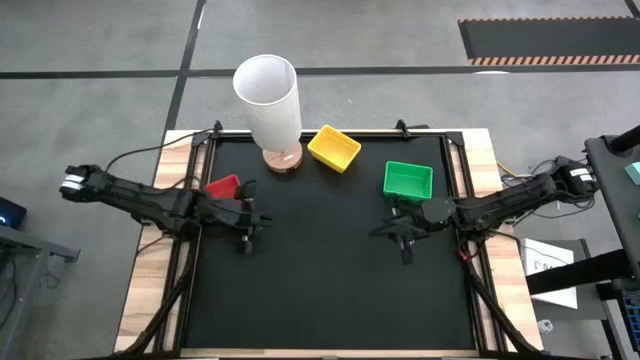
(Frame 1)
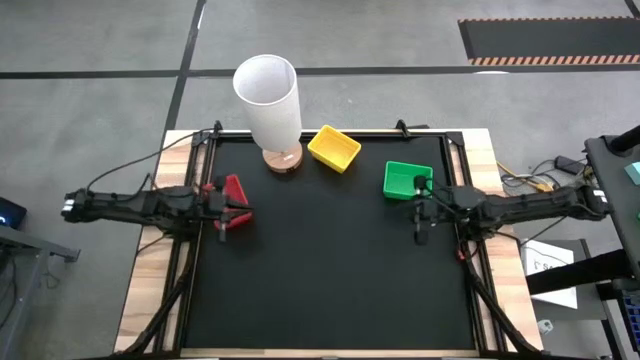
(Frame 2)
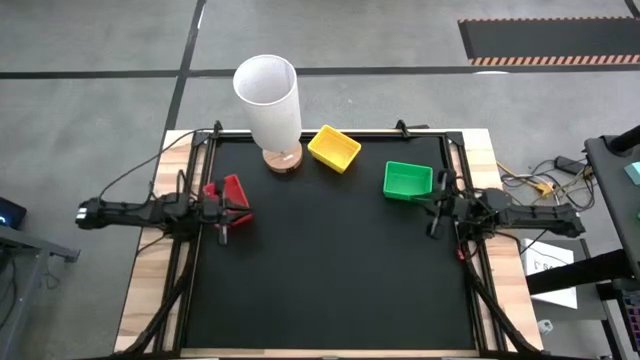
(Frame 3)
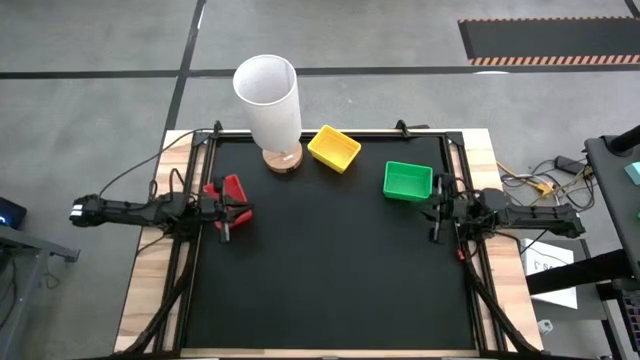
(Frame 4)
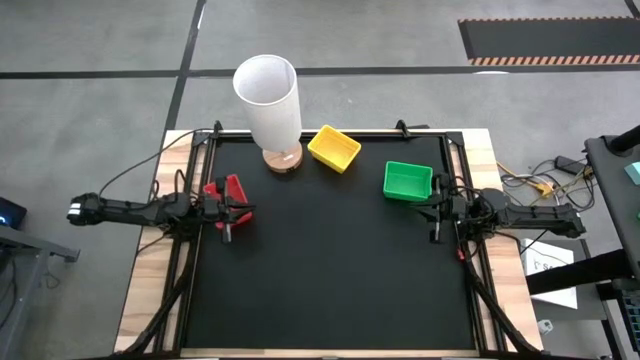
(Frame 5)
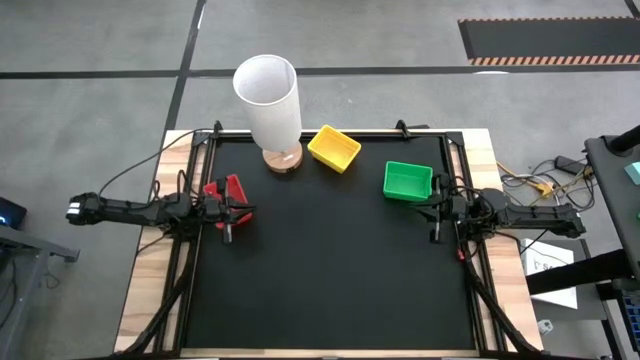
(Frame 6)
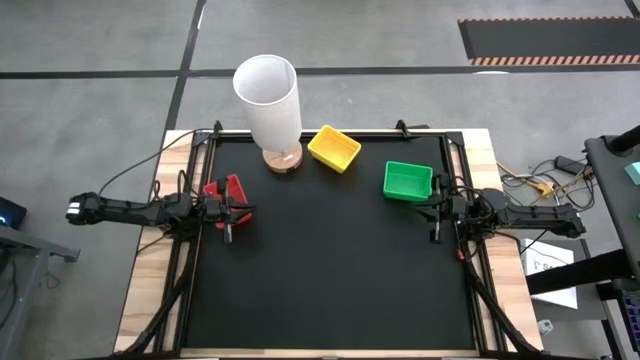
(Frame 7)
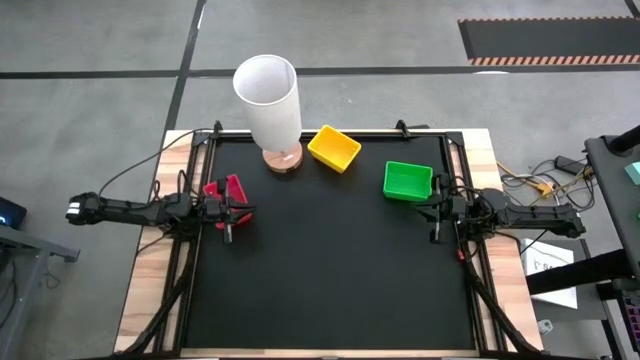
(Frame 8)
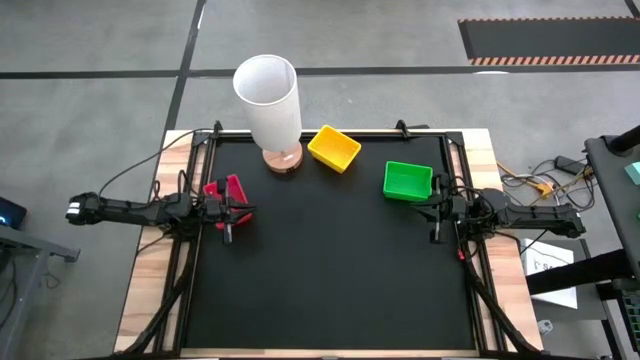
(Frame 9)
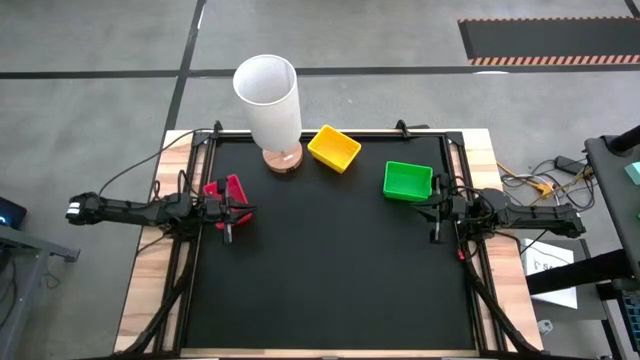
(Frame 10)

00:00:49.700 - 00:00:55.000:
Return to Home Position

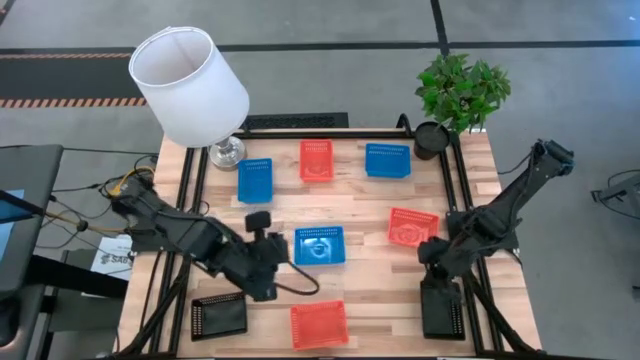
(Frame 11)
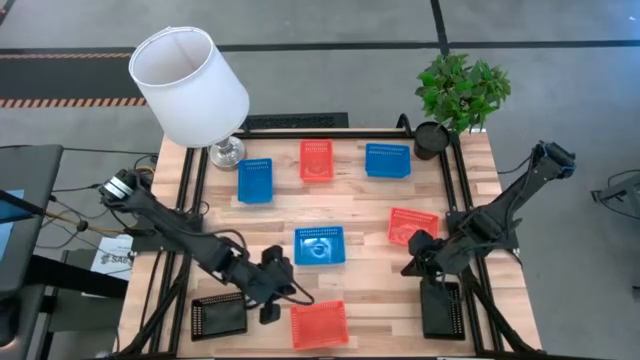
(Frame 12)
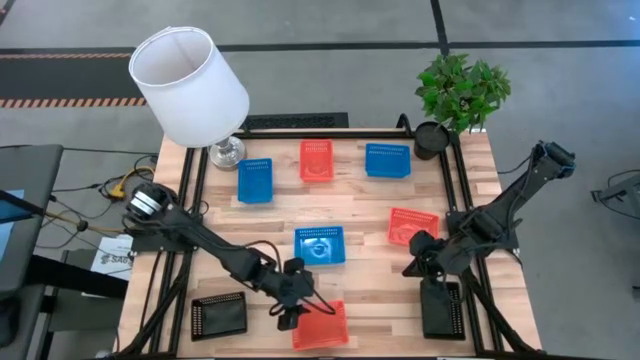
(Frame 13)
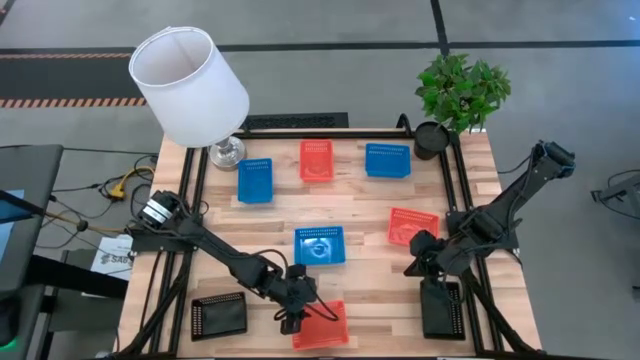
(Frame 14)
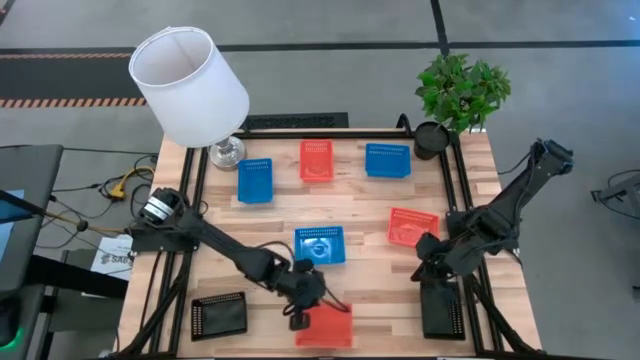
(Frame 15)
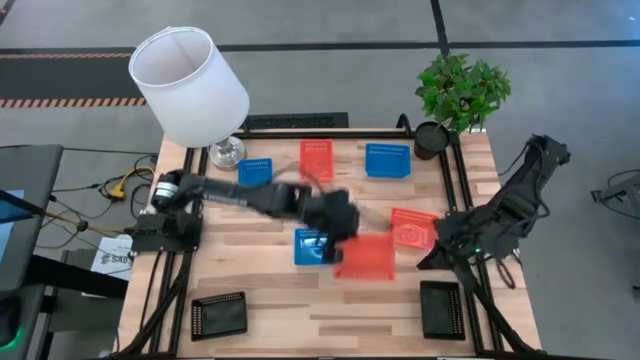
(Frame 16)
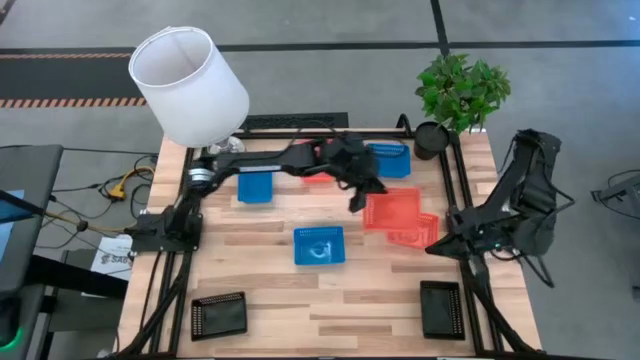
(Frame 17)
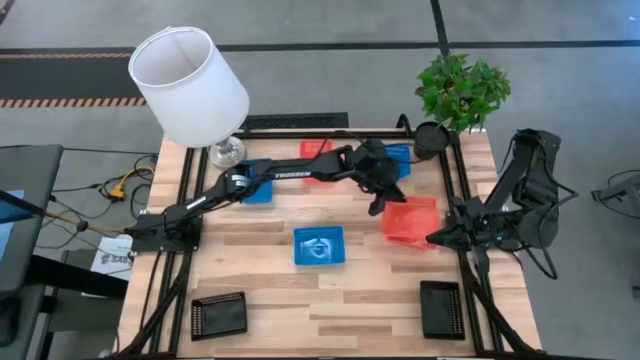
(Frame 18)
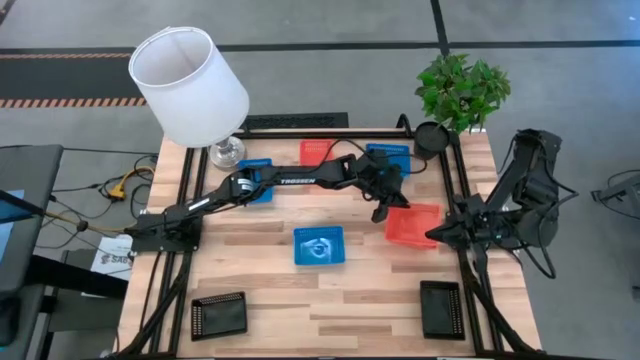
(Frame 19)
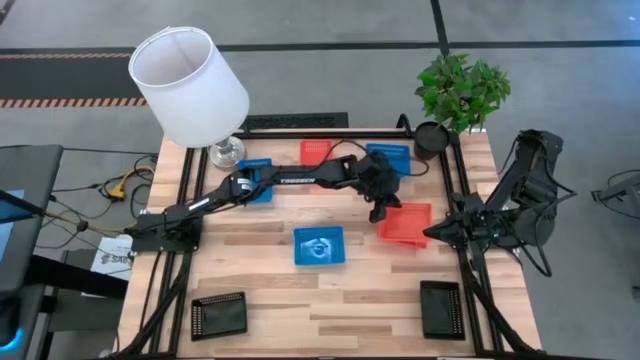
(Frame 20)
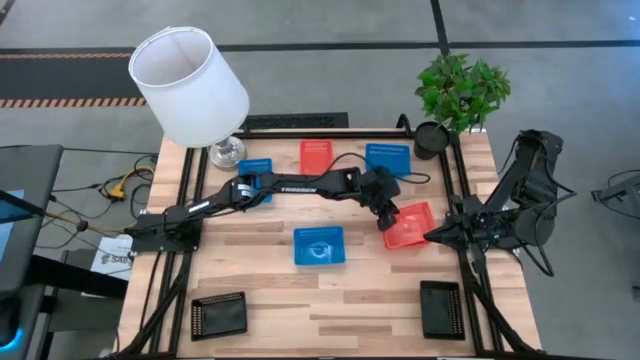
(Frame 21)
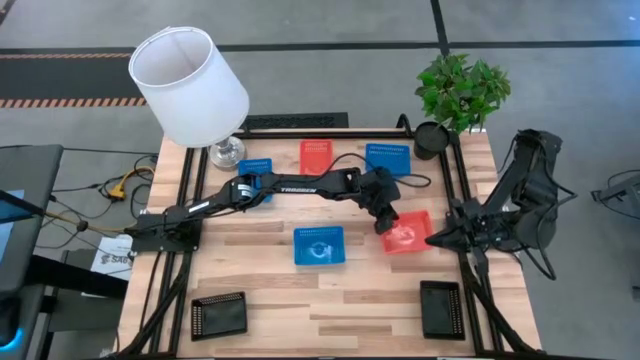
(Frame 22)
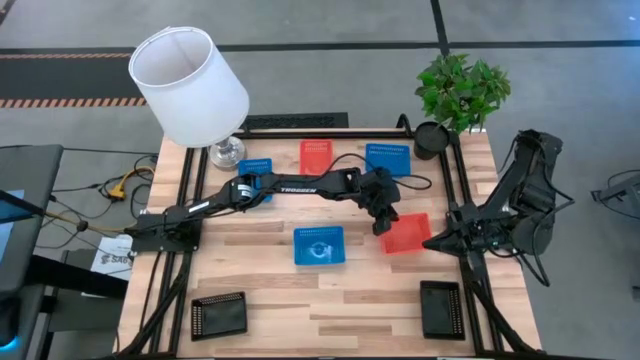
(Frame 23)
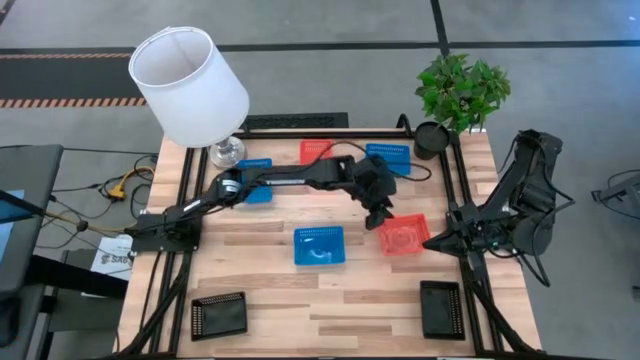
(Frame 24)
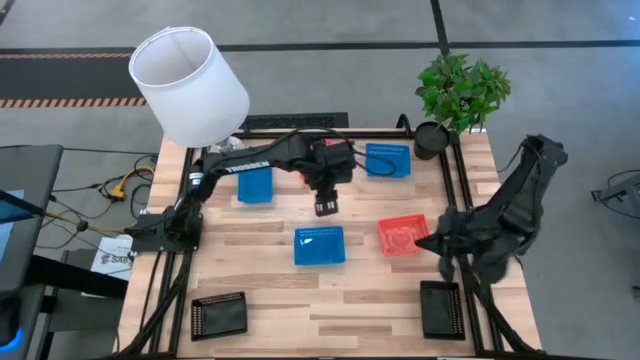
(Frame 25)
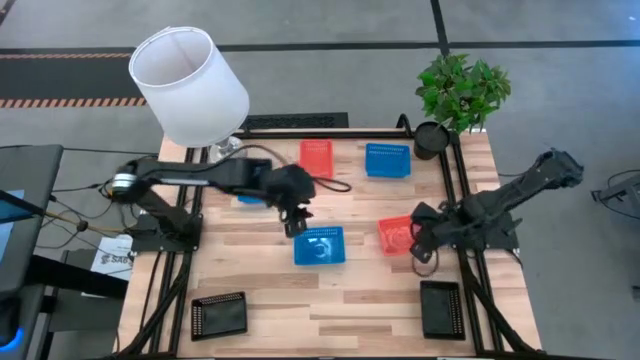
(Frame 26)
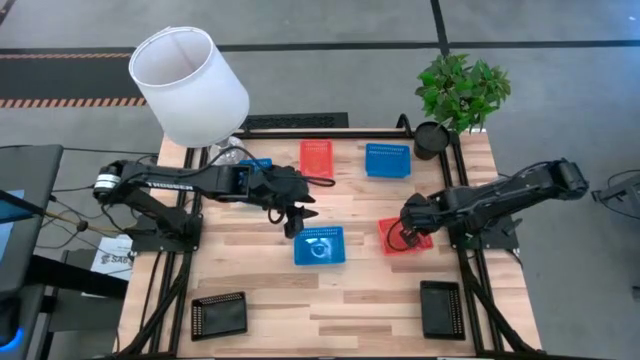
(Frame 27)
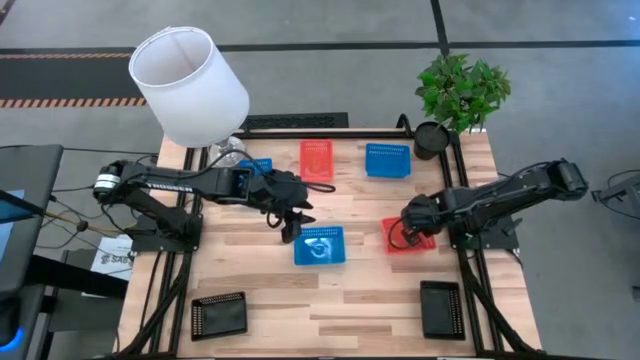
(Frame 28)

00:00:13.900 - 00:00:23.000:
Stack the bottom orange bin on top of the middle orange bin

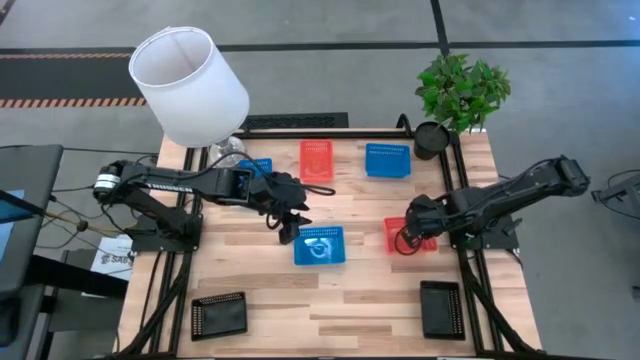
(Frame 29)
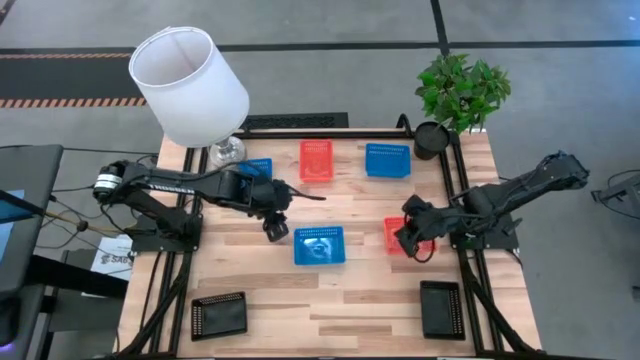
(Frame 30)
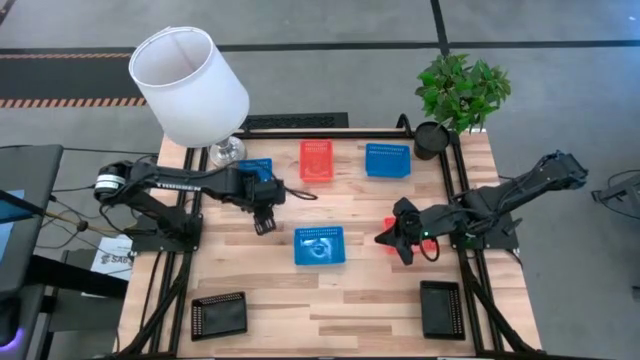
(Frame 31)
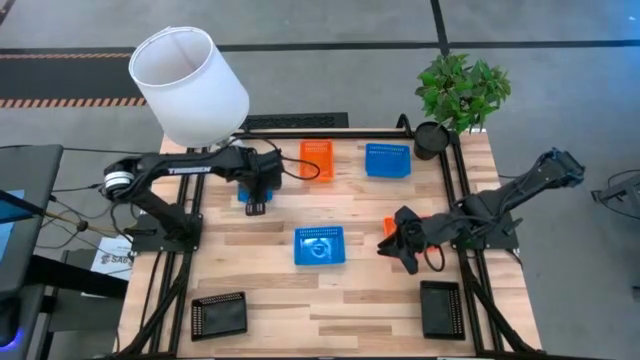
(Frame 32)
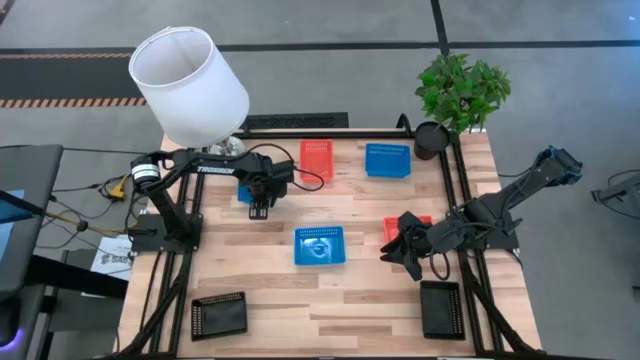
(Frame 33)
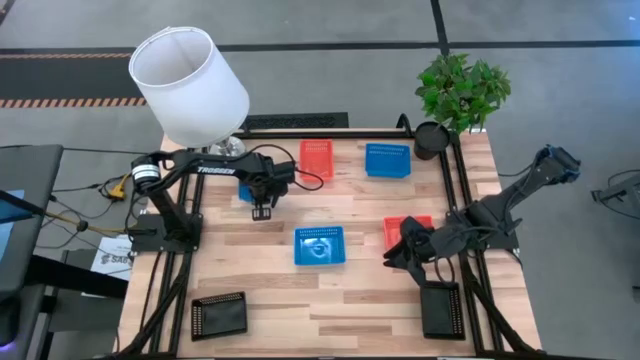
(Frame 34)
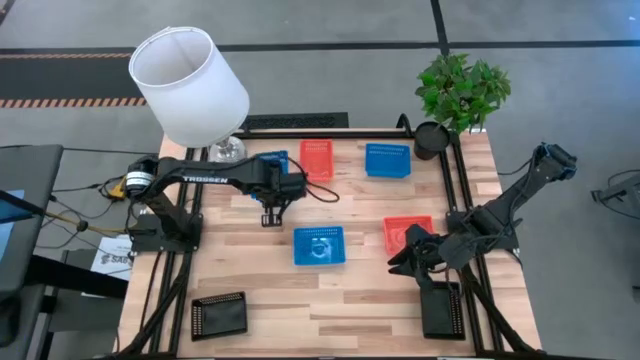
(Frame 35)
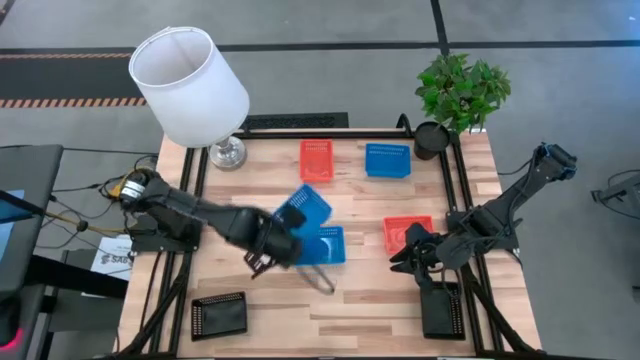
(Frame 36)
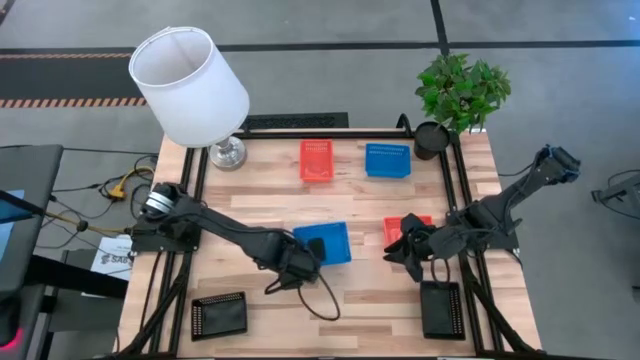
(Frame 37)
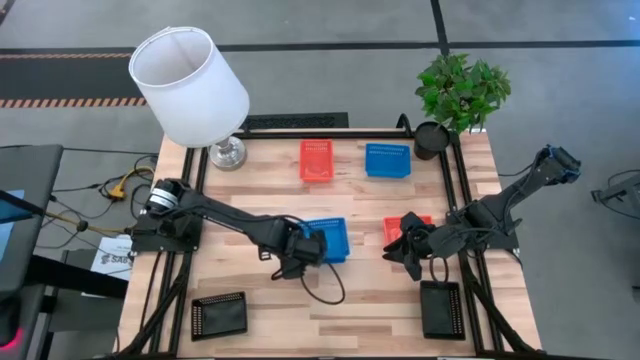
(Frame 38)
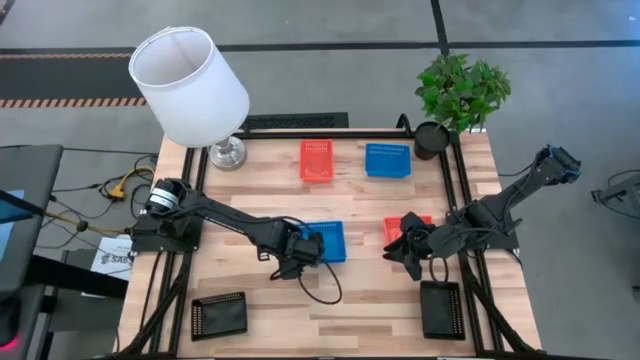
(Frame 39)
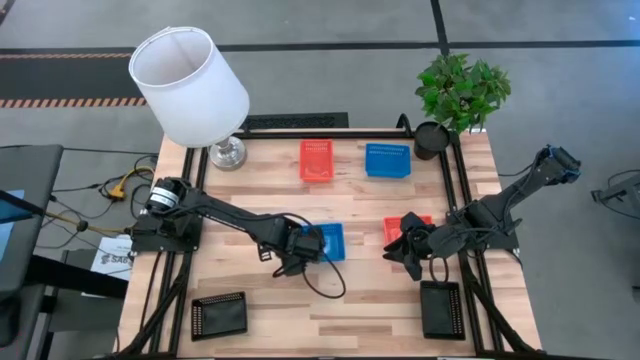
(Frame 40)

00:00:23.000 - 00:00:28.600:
Stack the top left blue bin on top of the bottom blue bin
